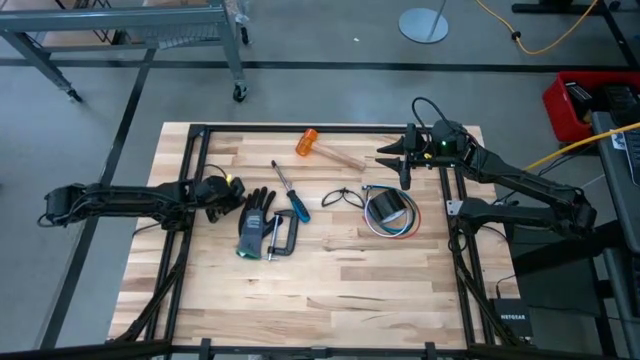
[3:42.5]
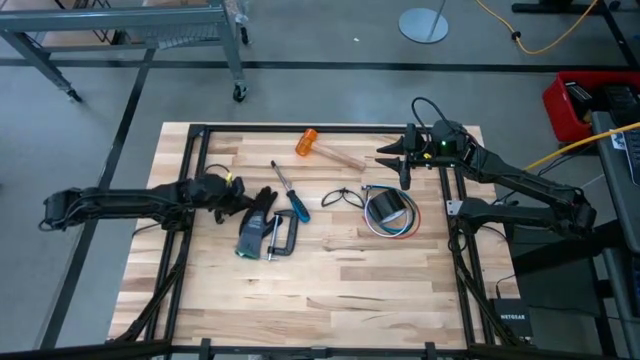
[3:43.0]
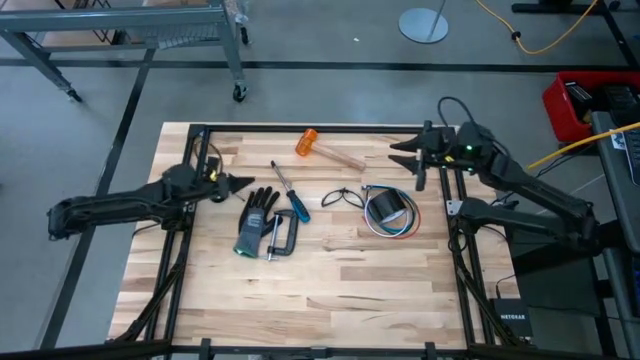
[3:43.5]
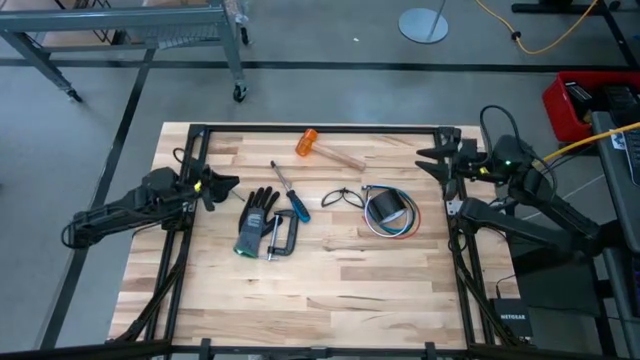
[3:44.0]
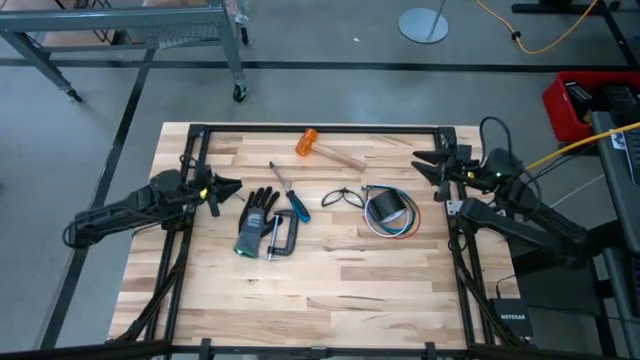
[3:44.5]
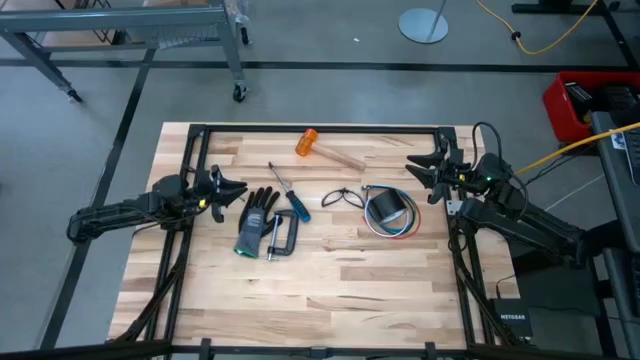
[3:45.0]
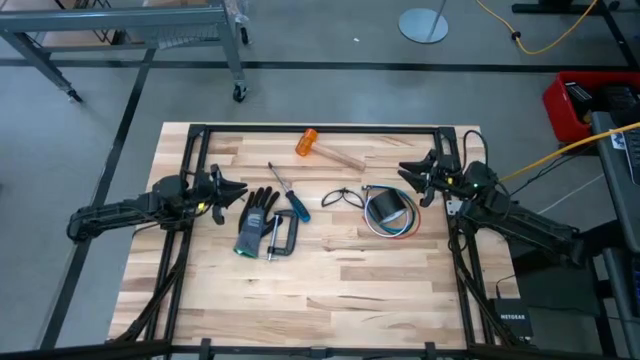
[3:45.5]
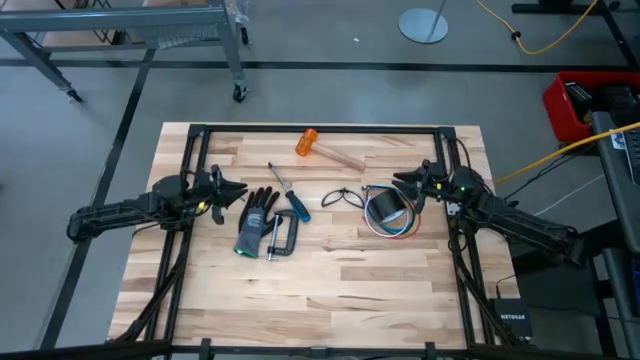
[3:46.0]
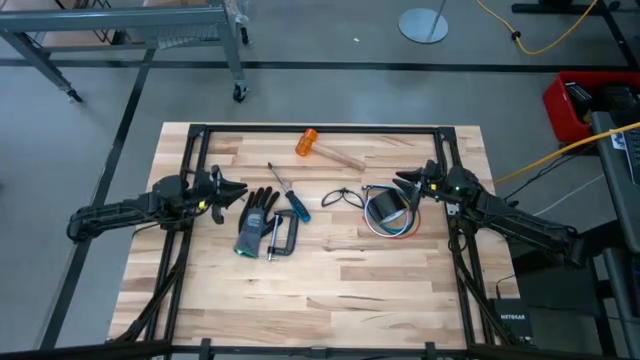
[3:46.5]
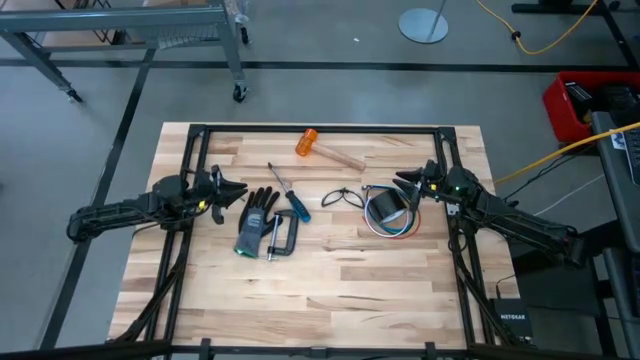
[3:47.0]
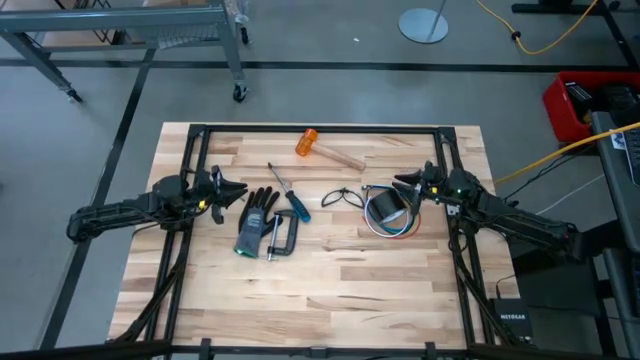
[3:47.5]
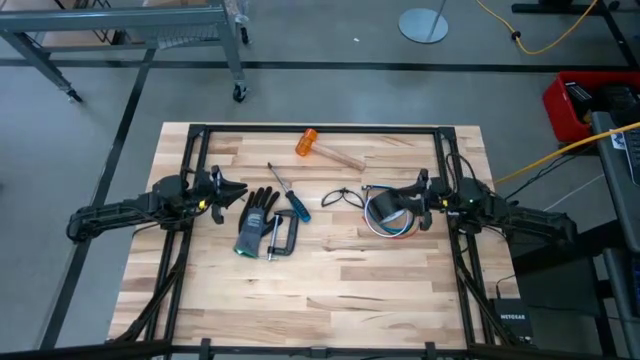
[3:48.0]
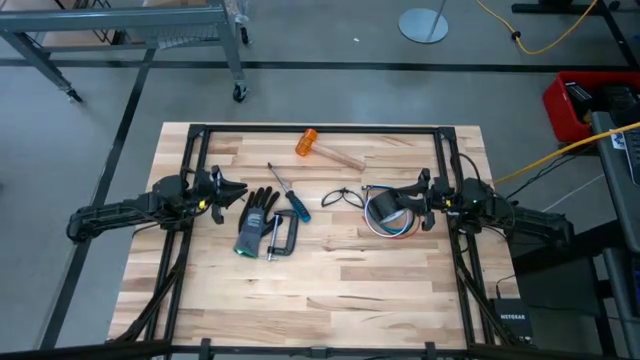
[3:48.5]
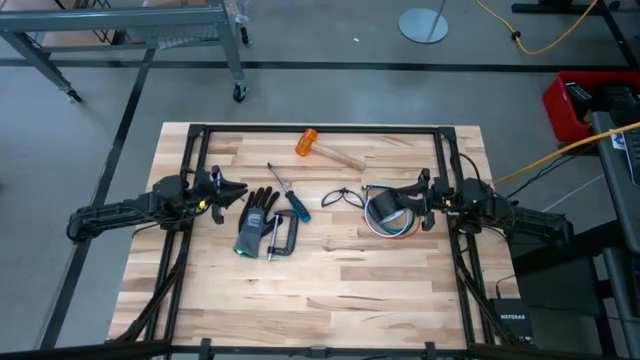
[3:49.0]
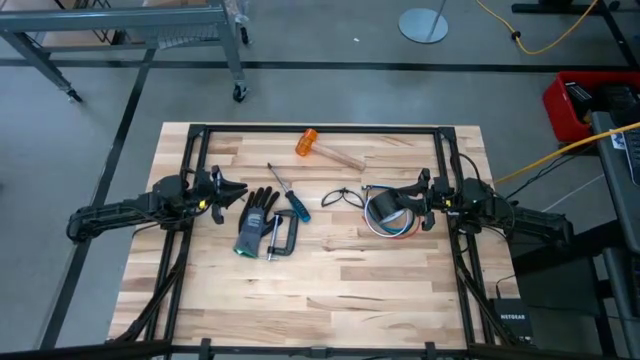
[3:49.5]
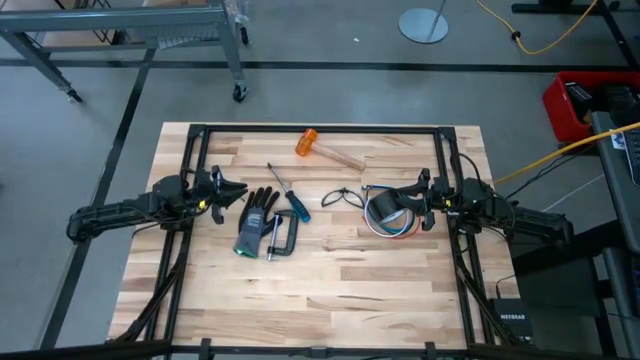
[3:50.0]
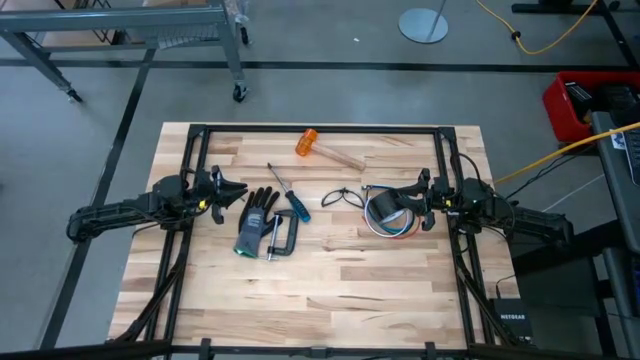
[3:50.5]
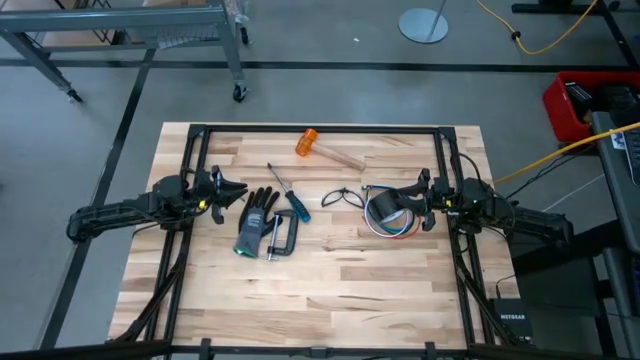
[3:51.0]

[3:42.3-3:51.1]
Task: Coil cords
Return to Home Position

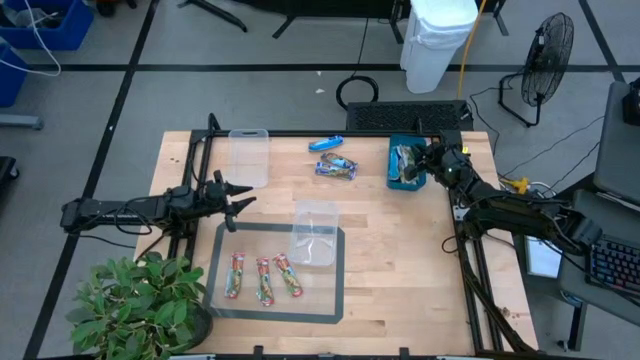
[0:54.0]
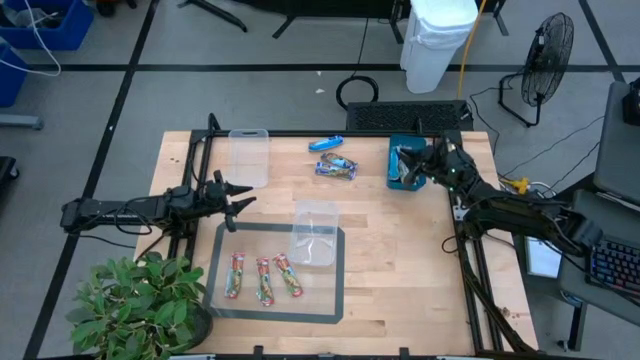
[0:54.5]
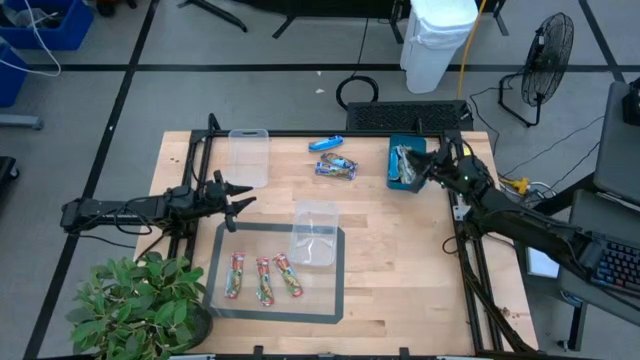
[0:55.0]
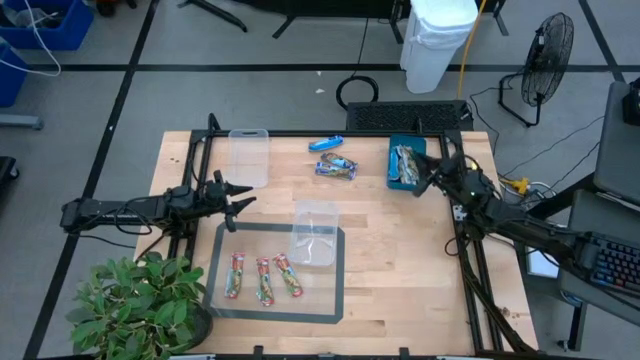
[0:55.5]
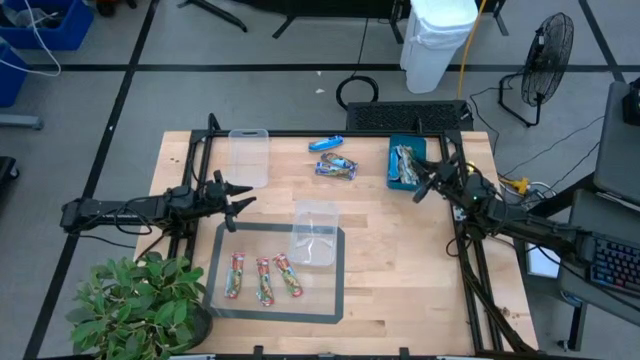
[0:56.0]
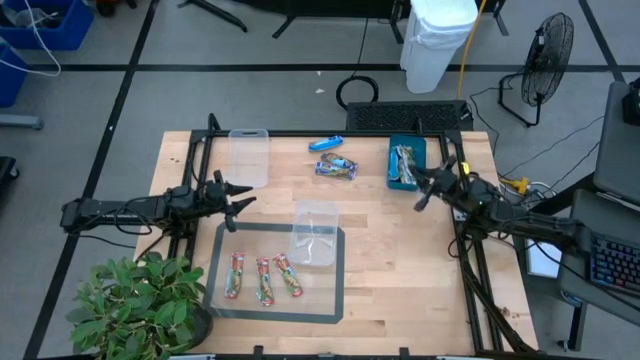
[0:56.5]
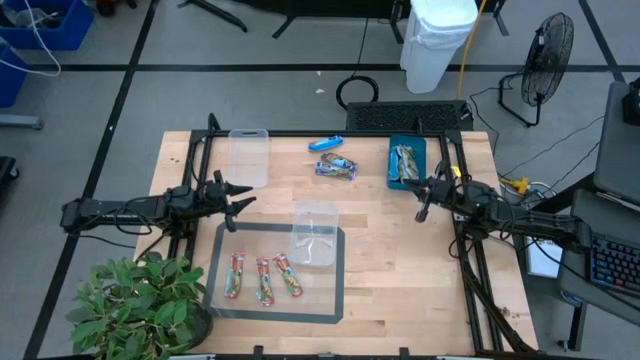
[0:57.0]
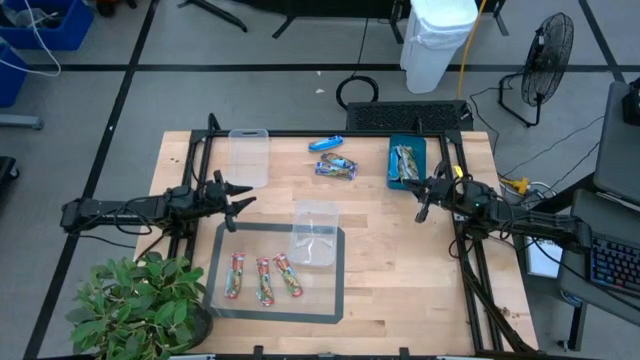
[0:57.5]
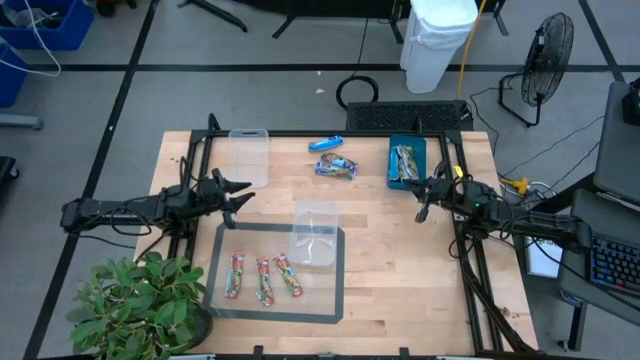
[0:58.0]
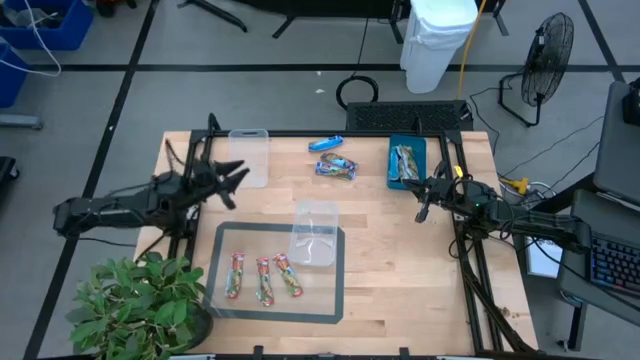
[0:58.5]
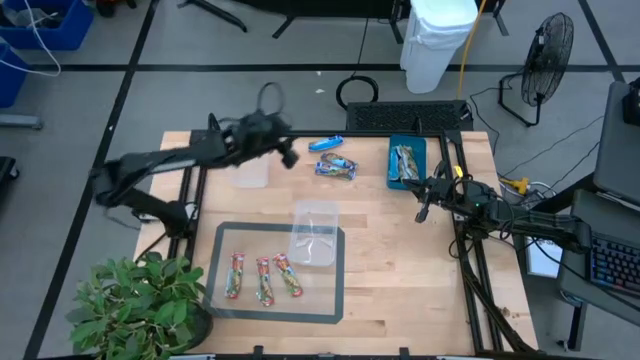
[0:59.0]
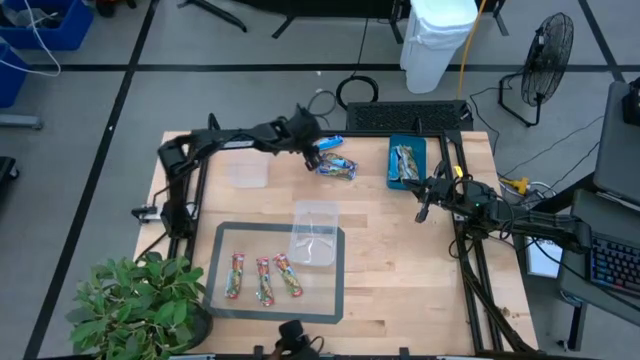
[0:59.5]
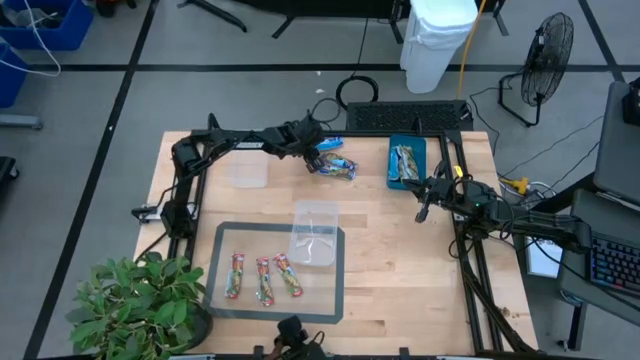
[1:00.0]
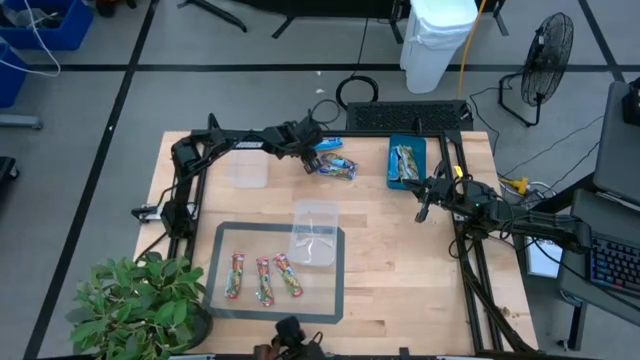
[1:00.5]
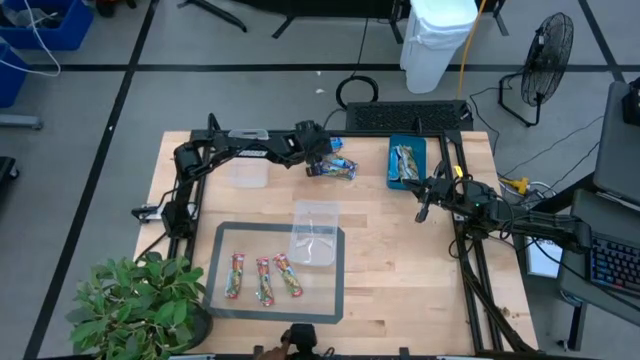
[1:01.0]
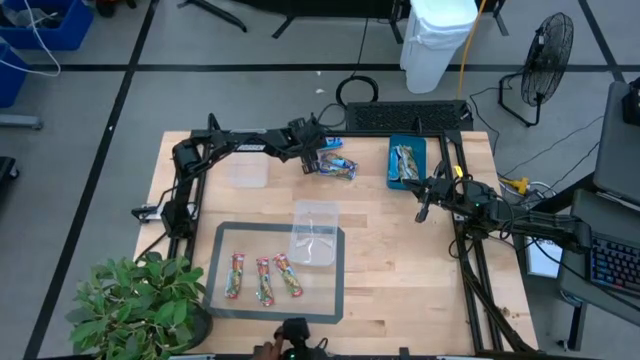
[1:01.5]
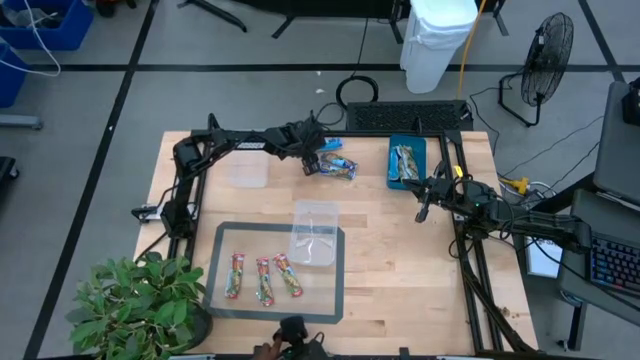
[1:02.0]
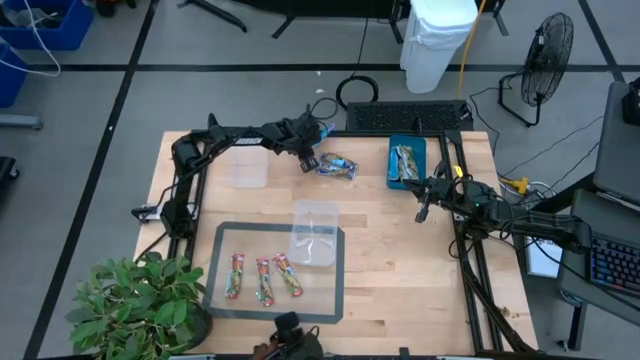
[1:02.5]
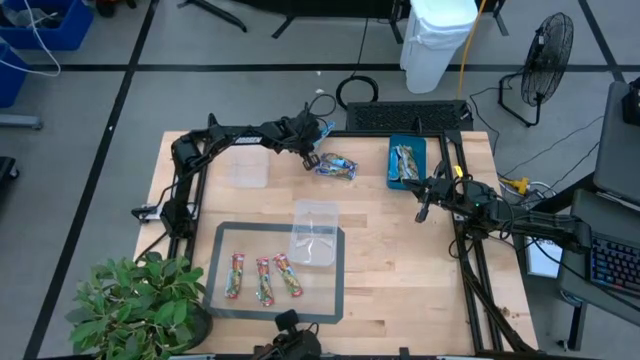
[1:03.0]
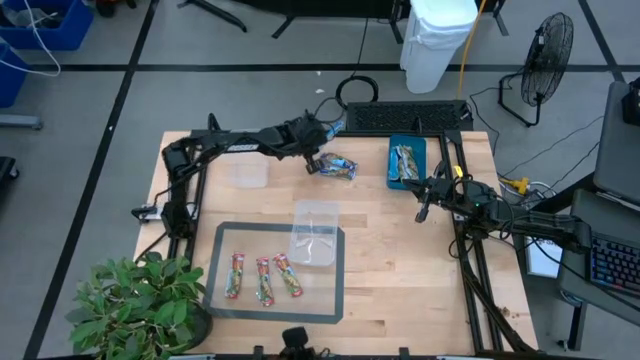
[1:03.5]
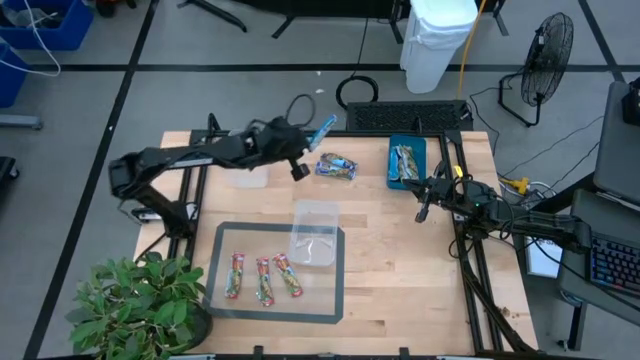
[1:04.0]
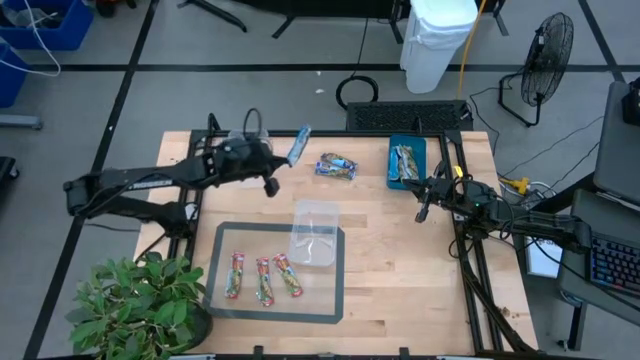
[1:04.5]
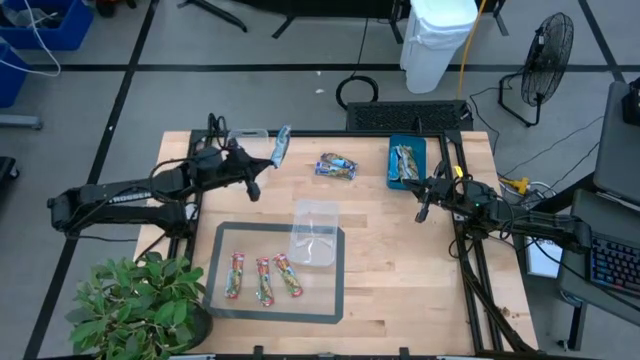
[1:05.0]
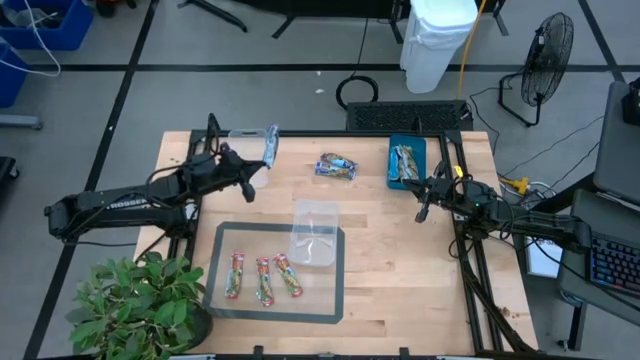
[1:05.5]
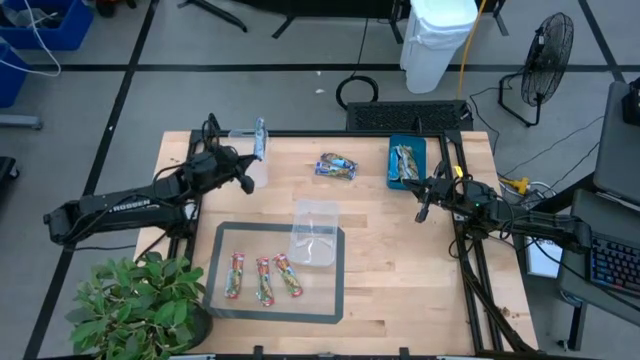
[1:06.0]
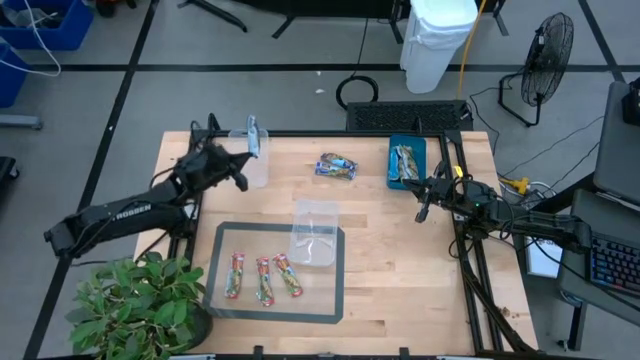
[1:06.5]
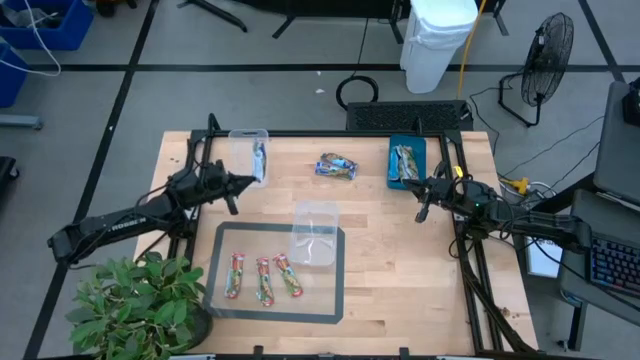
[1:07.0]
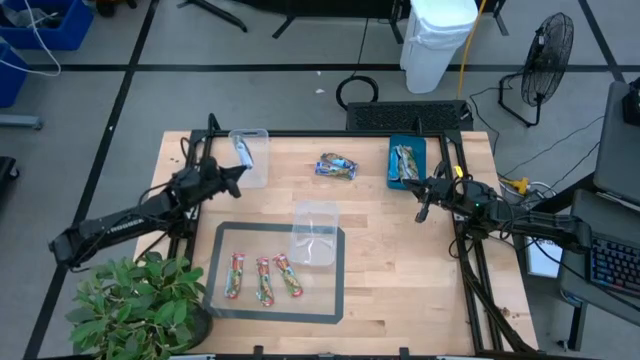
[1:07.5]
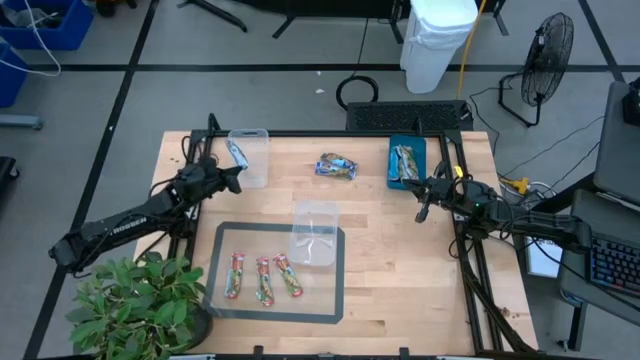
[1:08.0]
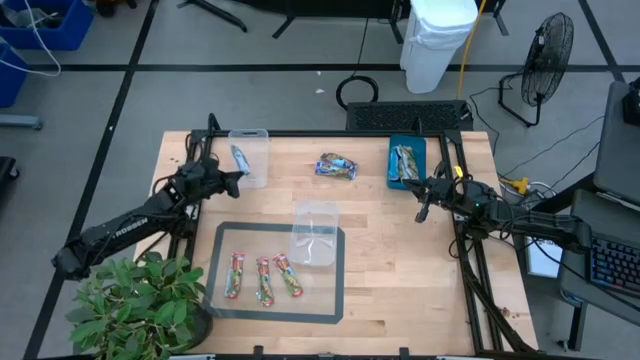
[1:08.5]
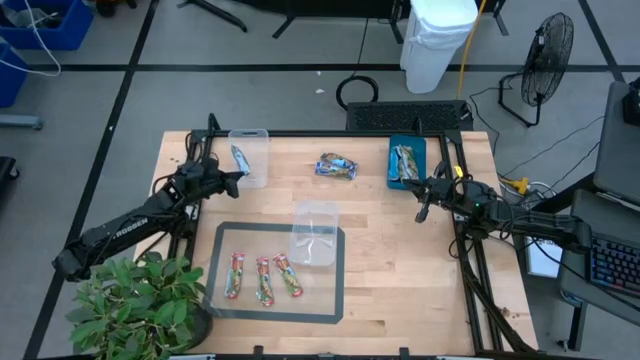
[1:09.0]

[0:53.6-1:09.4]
Task: Pick and place Granola Bars by type
Put the blue granola bar into the top blue bin
